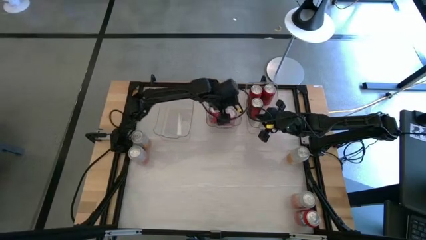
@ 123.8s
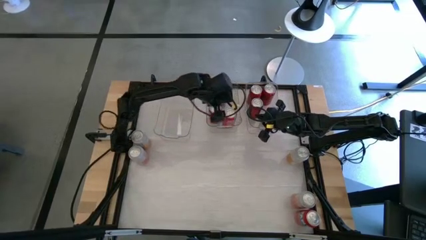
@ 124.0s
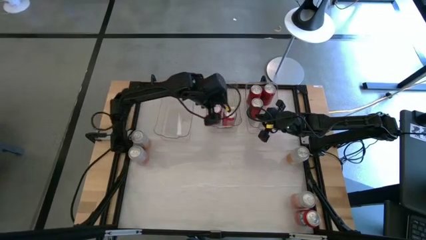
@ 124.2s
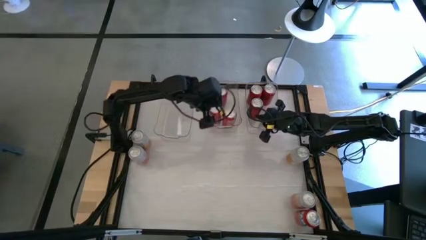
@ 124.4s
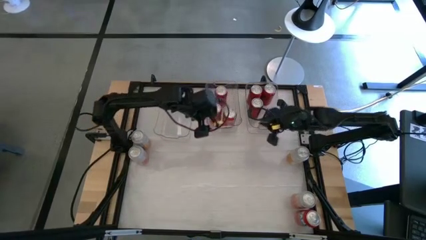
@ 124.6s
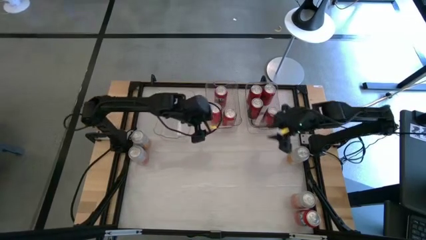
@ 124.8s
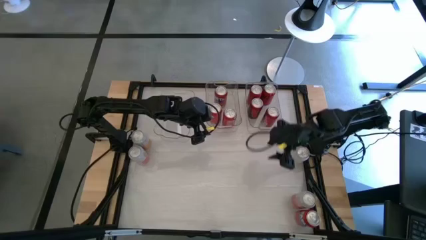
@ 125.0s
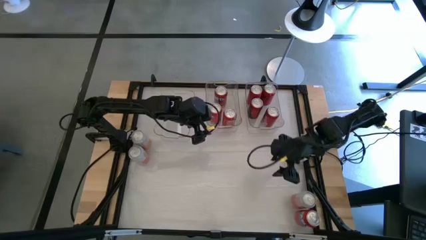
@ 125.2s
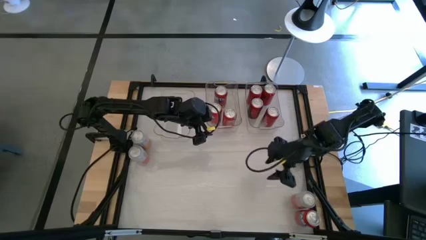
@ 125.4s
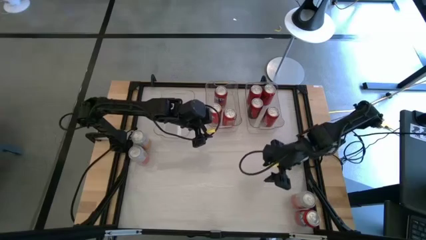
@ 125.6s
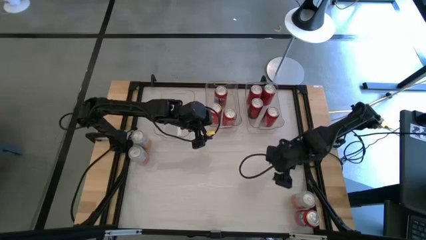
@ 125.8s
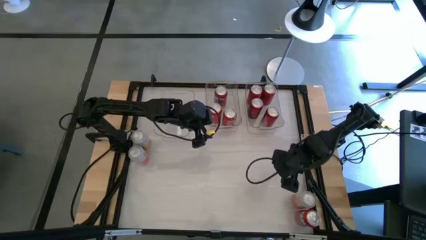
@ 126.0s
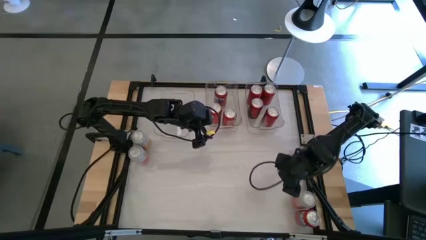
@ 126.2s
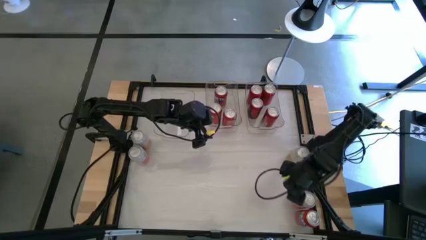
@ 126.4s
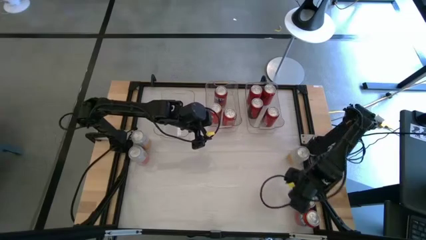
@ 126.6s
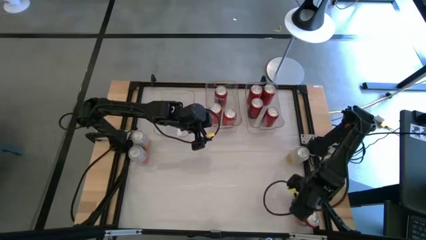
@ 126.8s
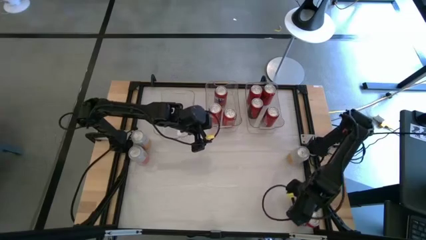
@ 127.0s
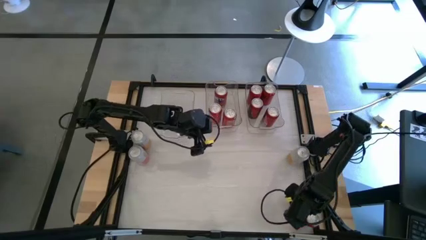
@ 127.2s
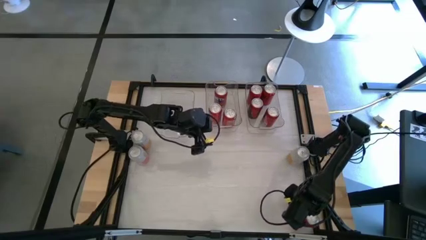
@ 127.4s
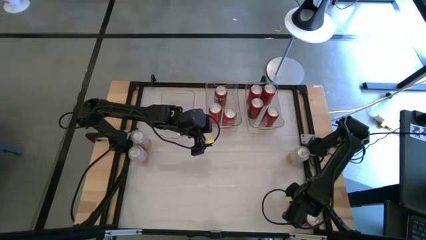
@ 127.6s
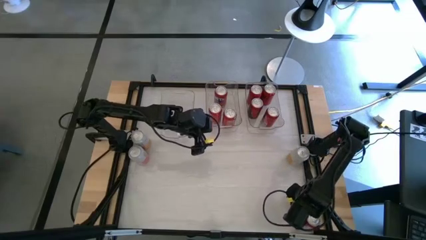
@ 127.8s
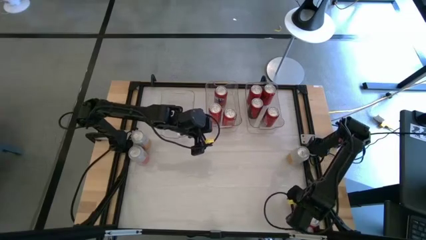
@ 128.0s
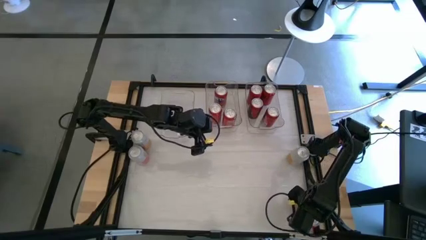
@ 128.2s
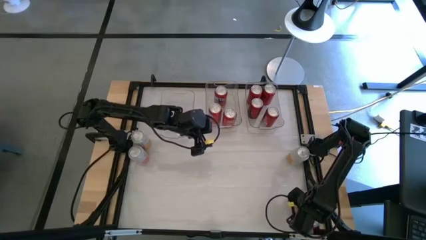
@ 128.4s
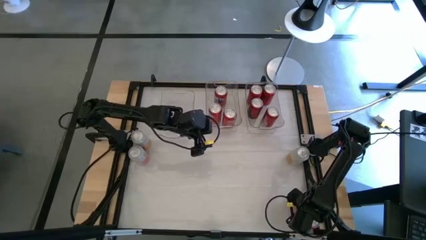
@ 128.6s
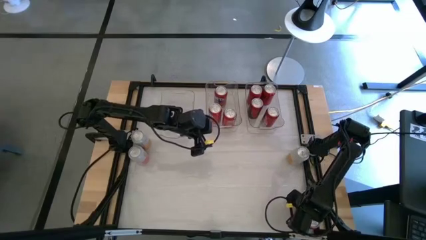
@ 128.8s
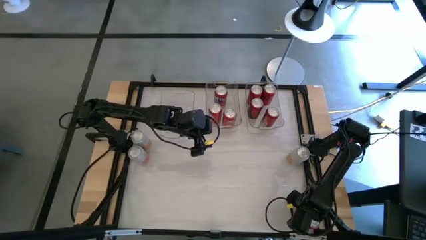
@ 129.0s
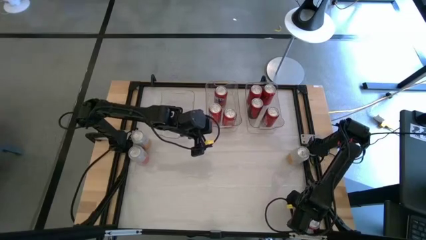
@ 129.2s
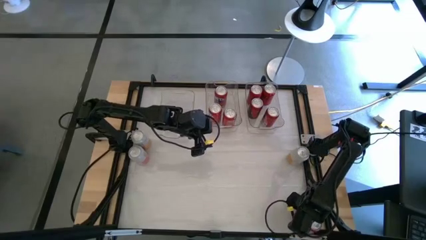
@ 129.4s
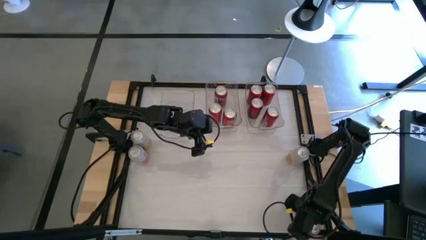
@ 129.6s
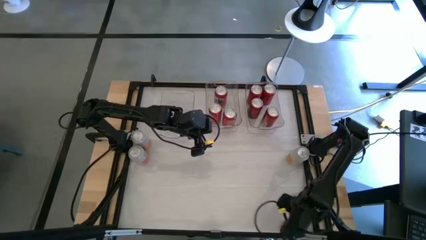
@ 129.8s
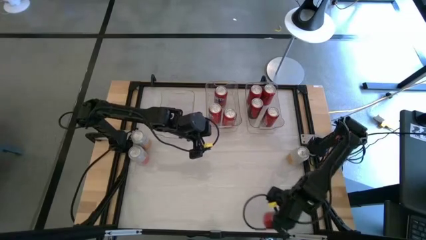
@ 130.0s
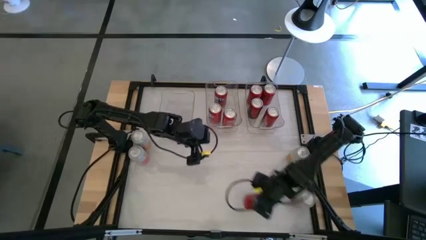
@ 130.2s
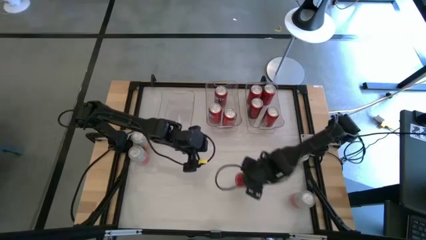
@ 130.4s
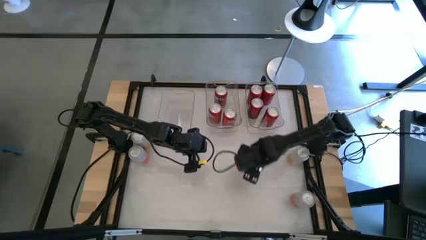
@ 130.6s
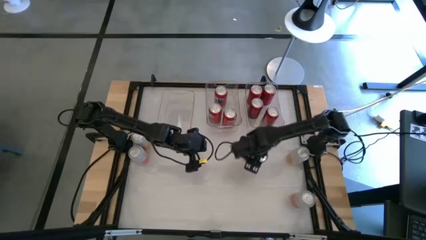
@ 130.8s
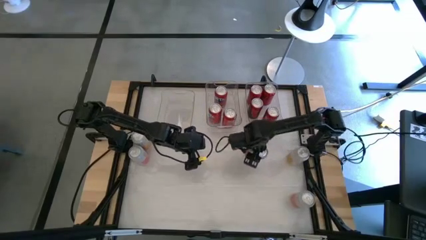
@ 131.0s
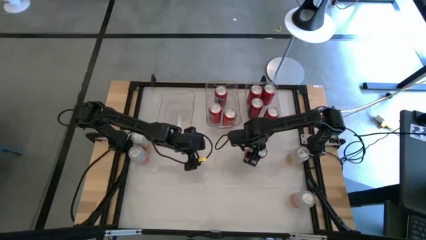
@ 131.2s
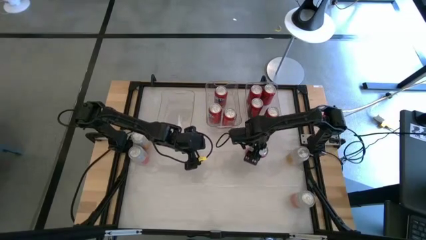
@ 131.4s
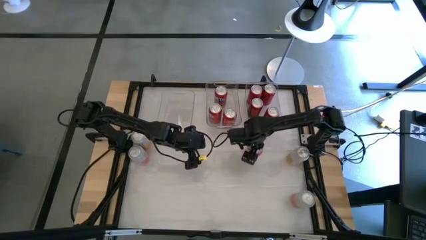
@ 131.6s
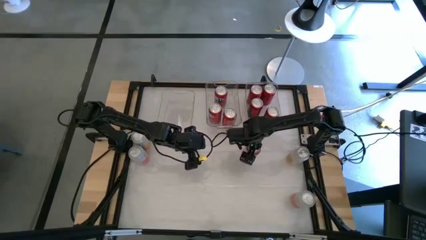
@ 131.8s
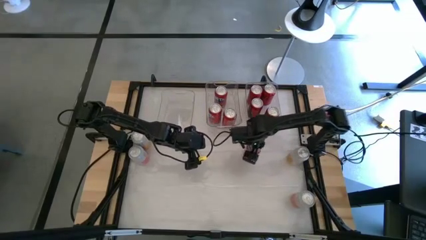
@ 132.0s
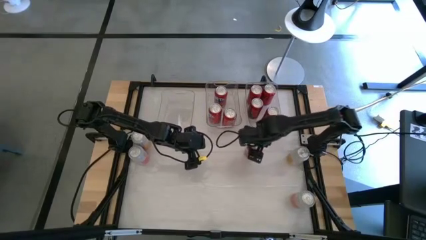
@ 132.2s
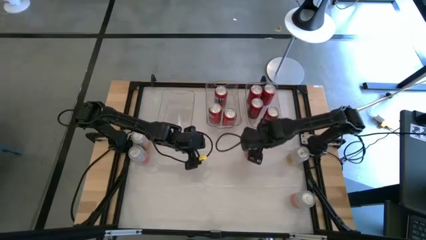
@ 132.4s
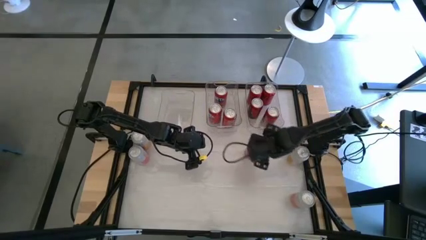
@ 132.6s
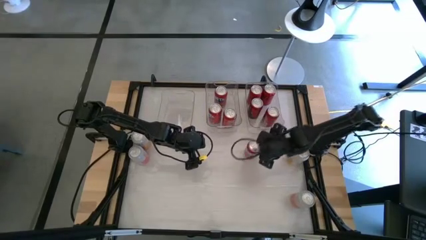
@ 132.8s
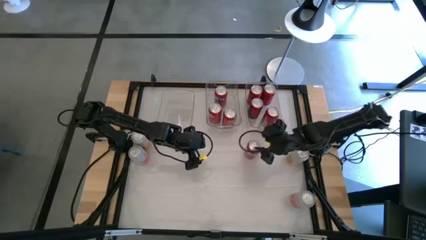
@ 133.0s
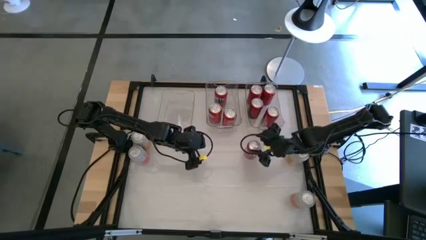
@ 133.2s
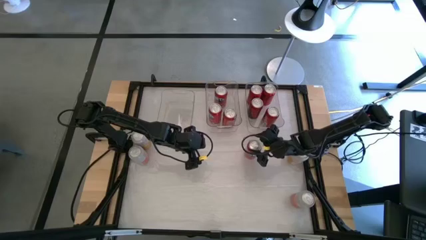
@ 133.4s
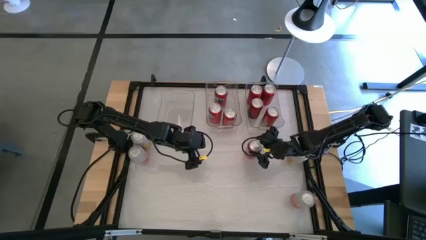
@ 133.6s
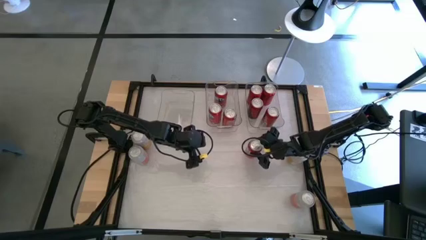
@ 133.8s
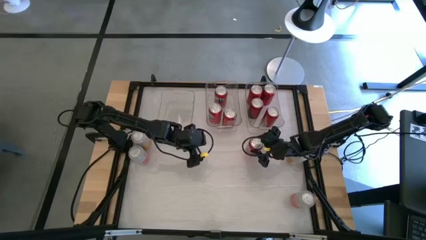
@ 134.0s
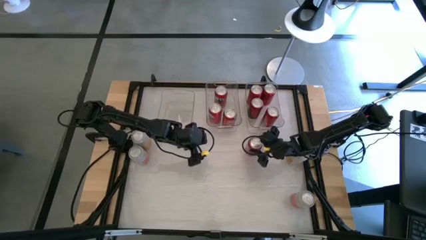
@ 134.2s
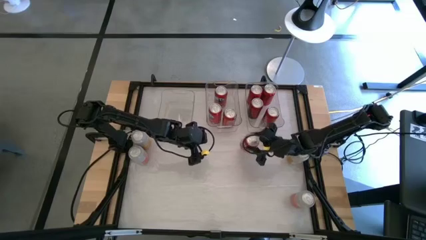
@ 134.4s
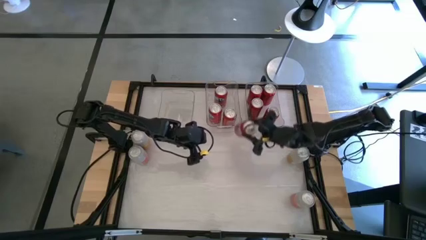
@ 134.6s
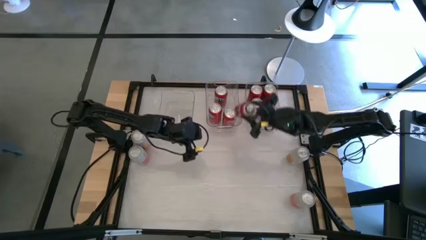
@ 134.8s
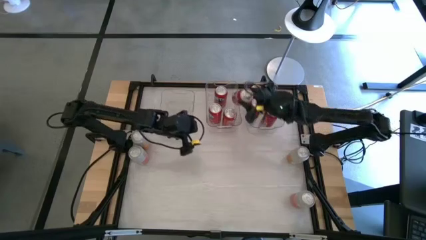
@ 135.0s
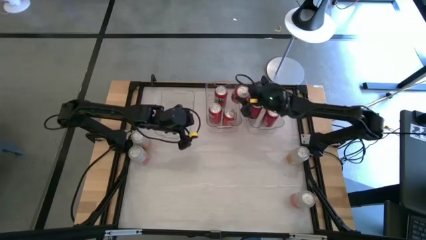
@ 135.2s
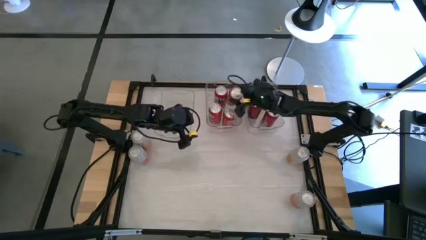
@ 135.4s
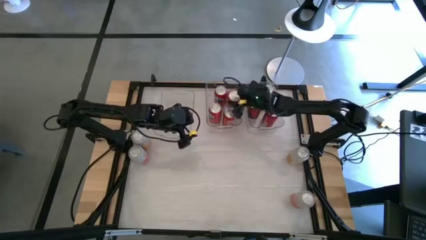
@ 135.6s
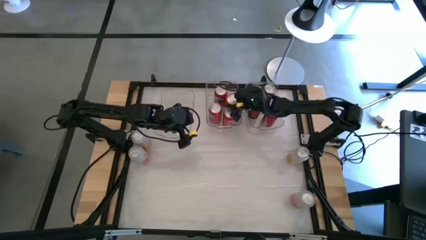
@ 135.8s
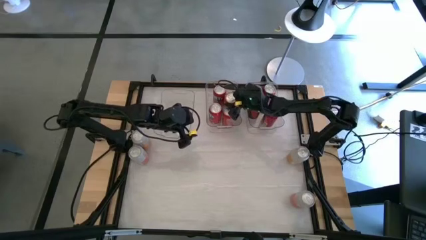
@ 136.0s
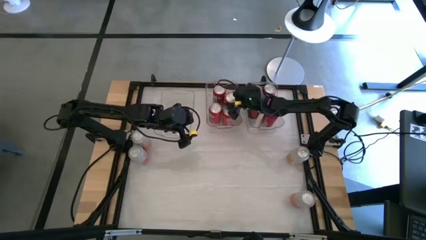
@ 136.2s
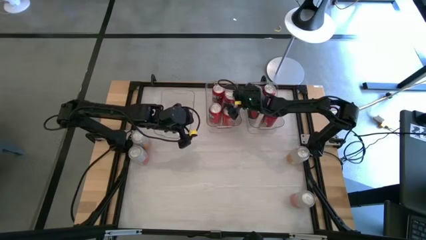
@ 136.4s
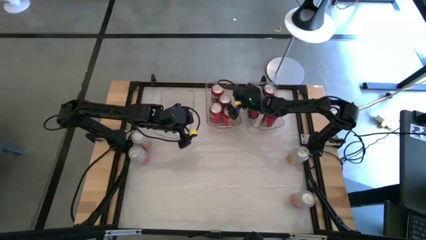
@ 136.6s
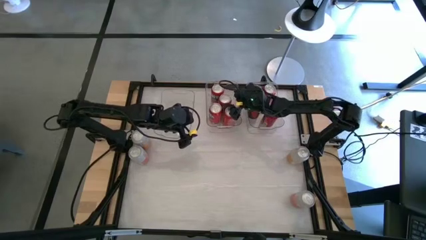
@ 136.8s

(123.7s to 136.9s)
Task: Sort soda cans
Put the red soda can into the middle transparent bin

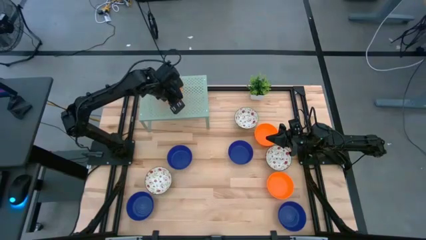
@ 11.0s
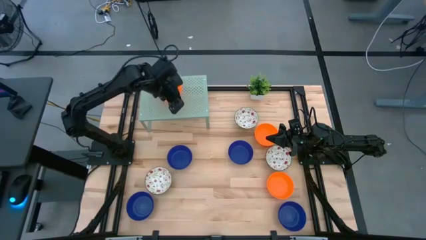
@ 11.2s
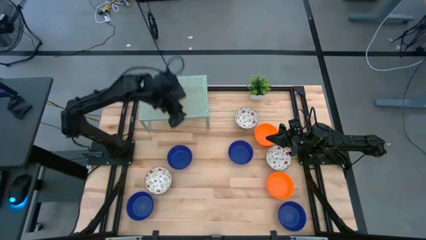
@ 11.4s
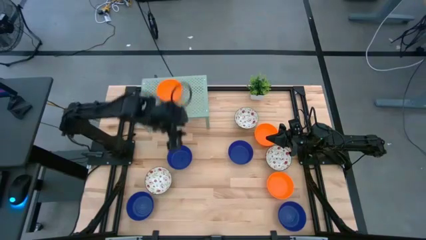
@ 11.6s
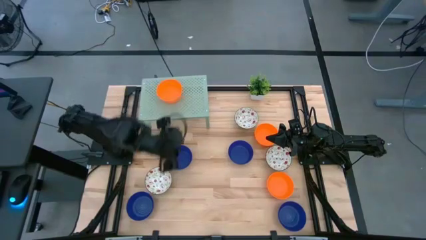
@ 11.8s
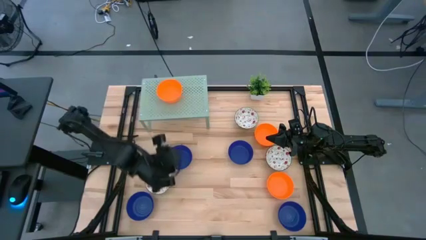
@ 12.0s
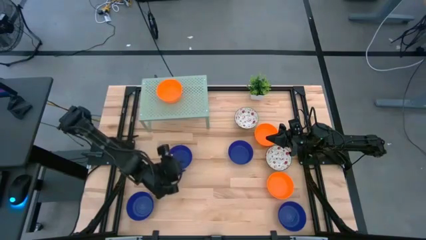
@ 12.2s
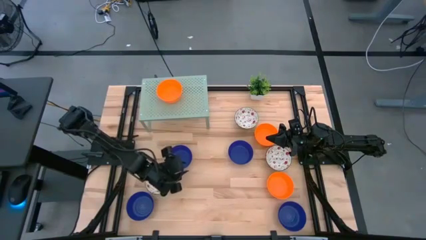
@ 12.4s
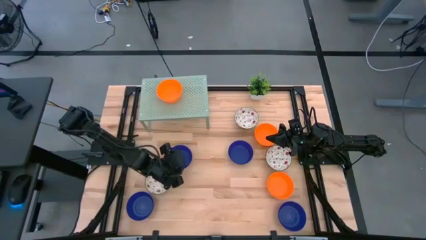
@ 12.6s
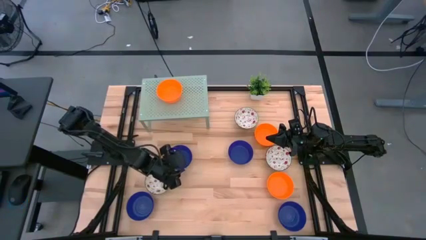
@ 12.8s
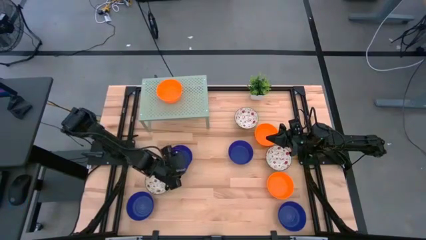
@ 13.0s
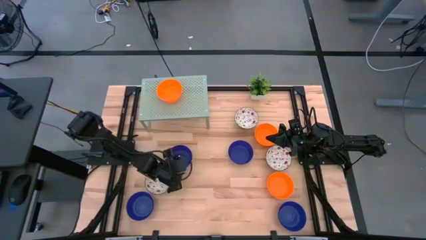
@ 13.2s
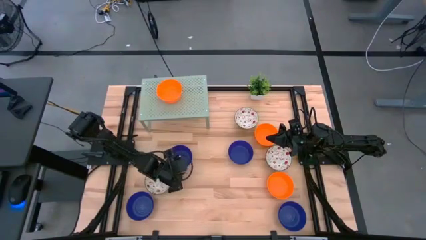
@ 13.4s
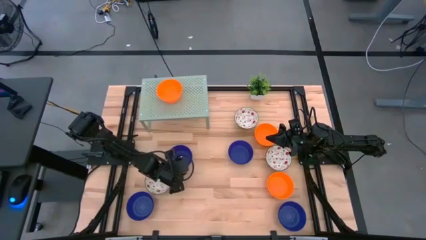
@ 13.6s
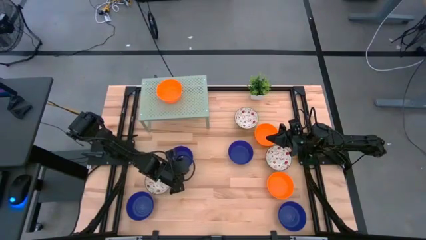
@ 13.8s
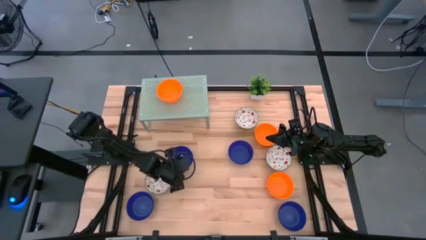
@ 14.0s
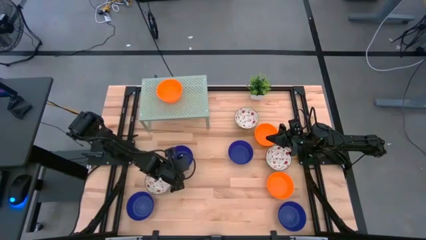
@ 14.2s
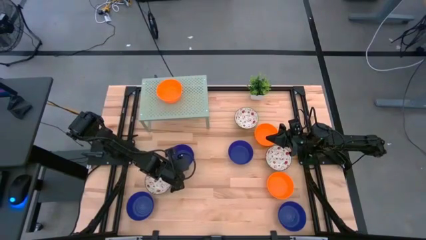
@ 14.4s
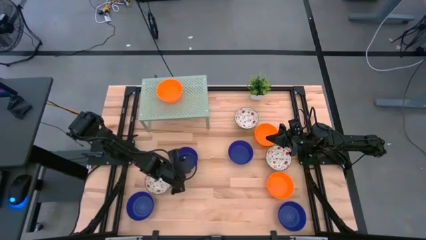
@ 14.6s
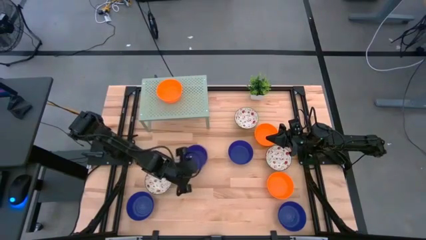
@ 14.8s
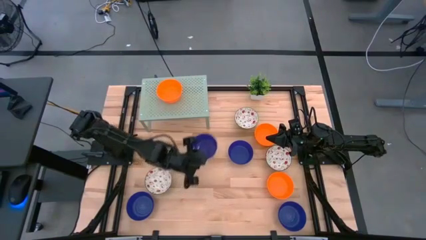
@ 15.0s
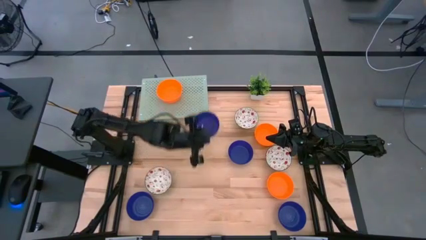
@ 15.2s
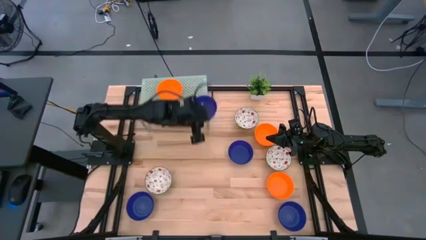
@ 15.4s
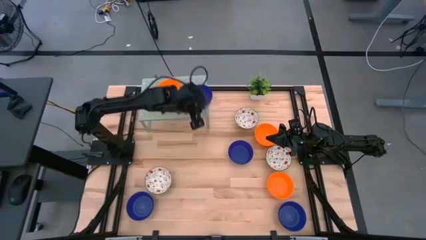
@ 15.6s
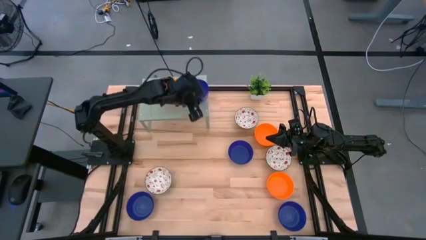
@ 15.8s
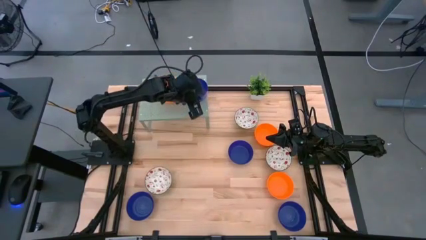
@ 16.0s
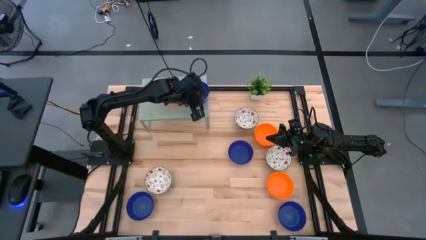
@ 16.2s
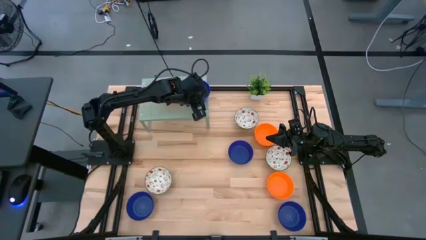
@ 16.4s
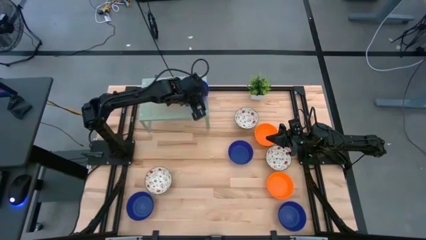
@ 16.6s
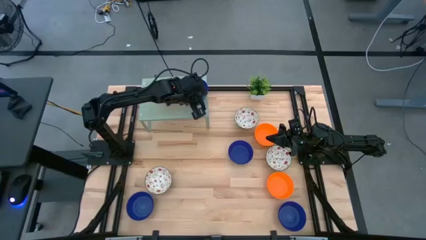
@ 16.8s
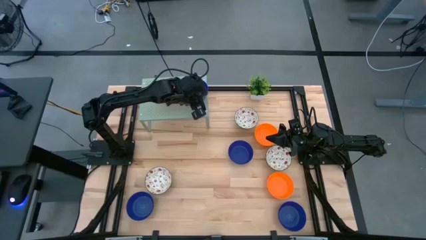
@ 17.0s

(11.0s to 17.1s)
Task: Pick & Place Mini bowls
Put the blue bowl on the shelf
